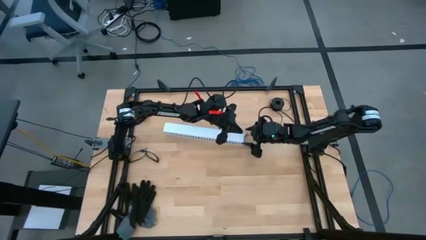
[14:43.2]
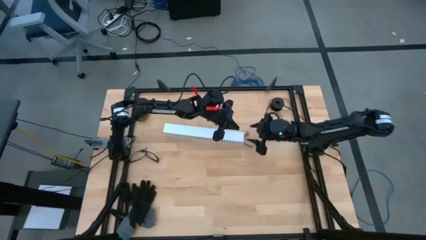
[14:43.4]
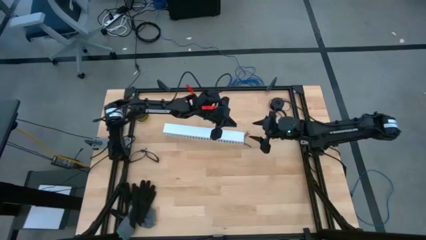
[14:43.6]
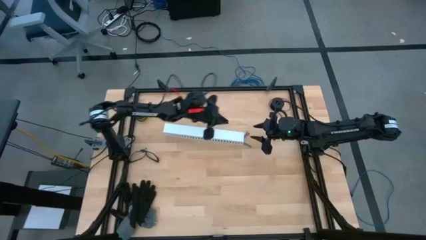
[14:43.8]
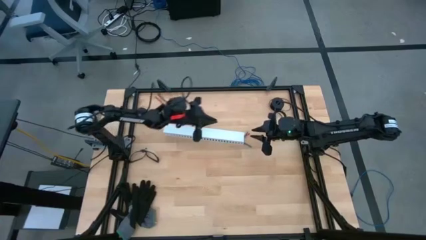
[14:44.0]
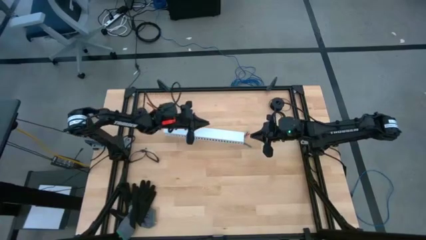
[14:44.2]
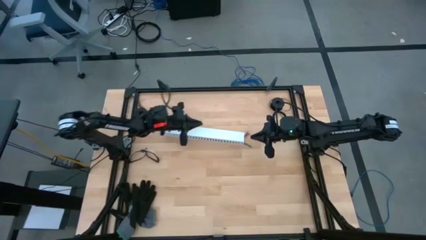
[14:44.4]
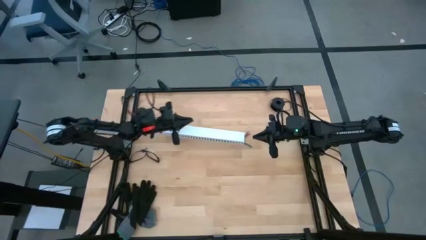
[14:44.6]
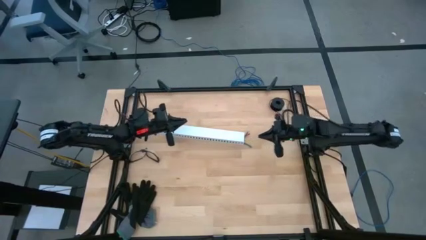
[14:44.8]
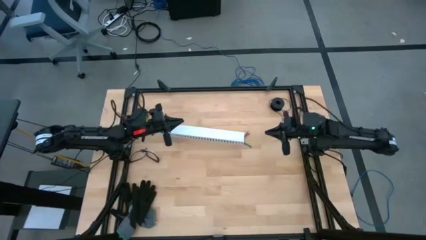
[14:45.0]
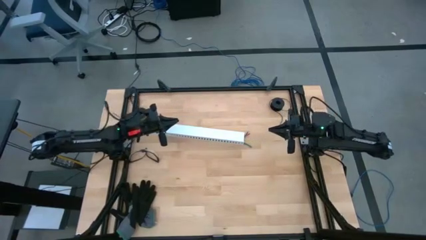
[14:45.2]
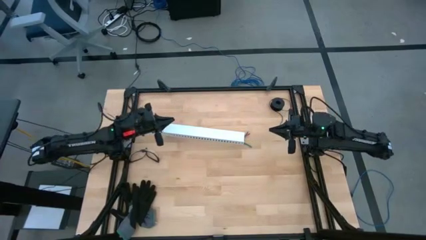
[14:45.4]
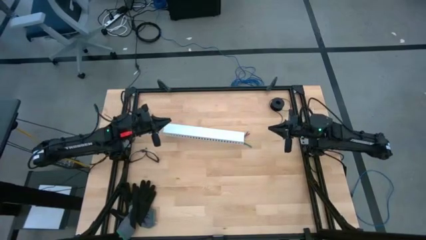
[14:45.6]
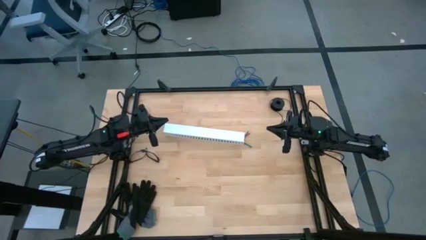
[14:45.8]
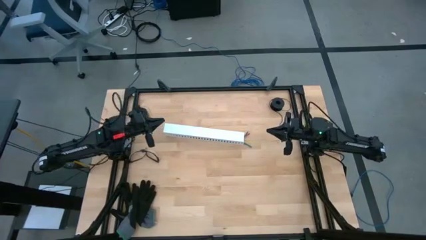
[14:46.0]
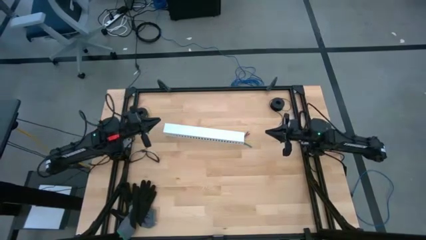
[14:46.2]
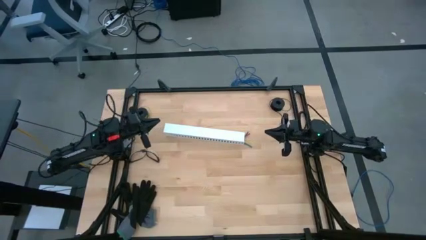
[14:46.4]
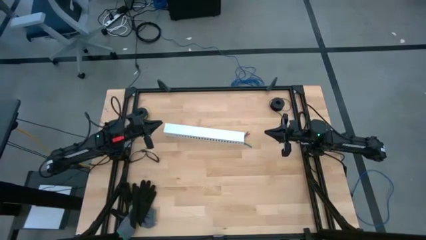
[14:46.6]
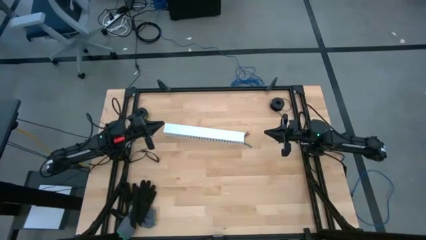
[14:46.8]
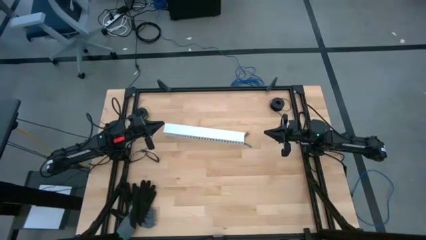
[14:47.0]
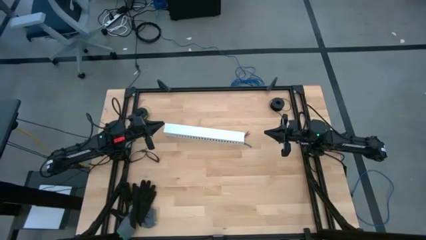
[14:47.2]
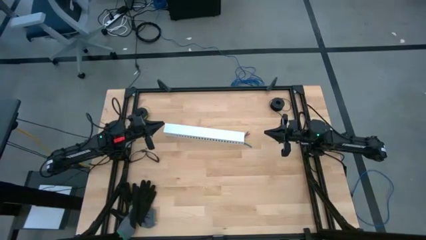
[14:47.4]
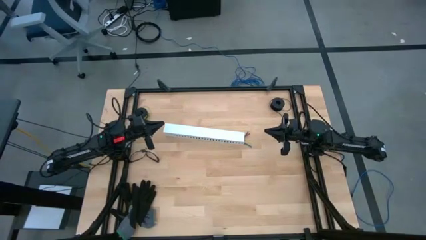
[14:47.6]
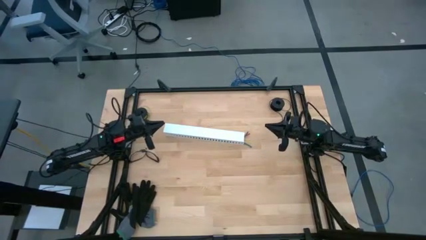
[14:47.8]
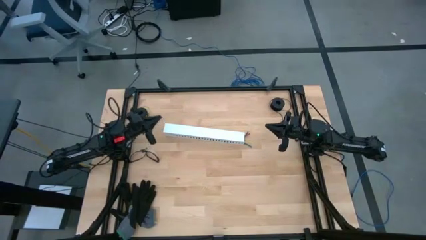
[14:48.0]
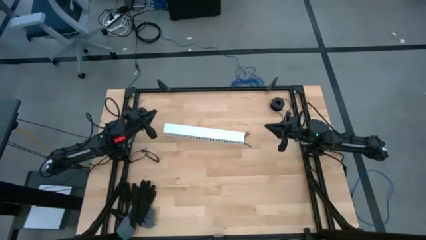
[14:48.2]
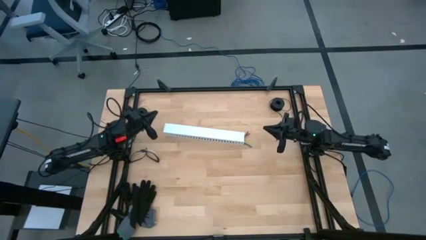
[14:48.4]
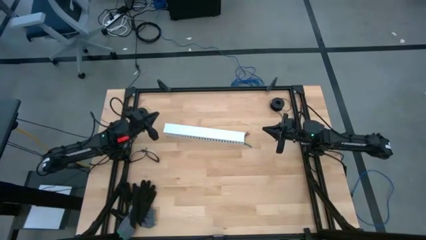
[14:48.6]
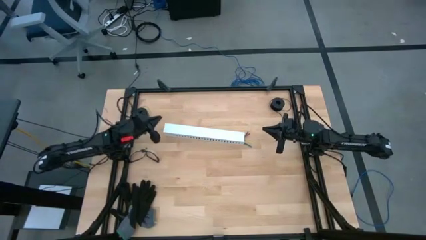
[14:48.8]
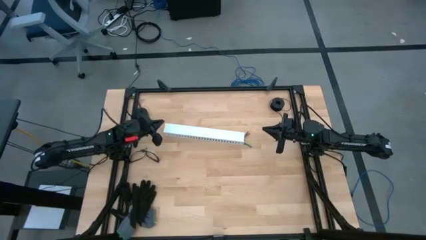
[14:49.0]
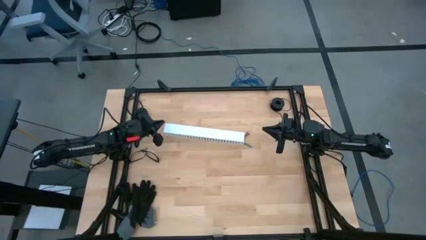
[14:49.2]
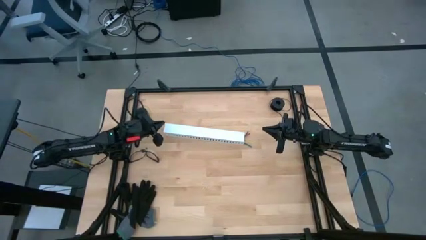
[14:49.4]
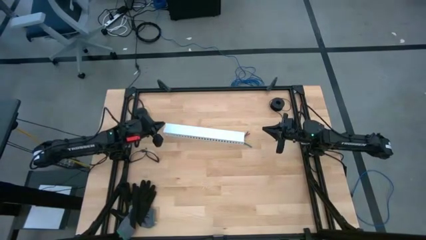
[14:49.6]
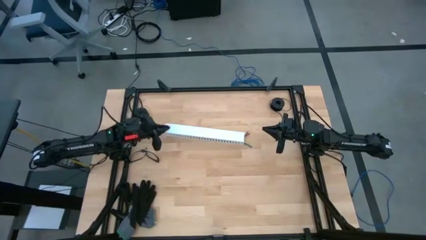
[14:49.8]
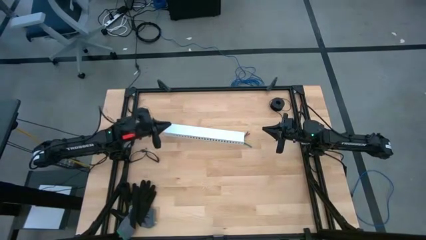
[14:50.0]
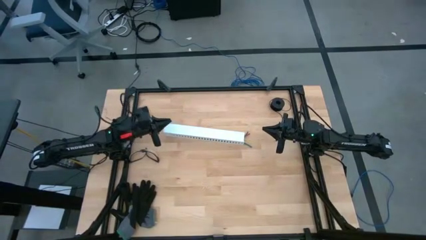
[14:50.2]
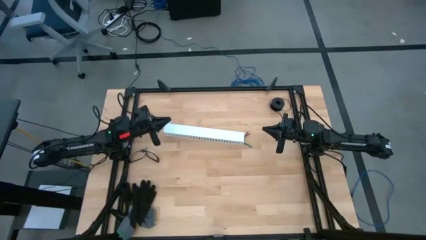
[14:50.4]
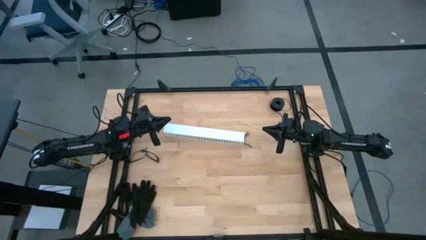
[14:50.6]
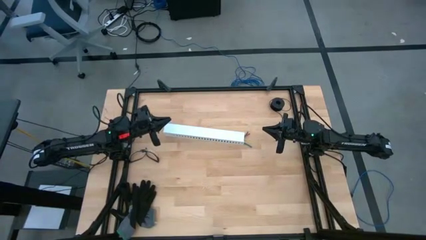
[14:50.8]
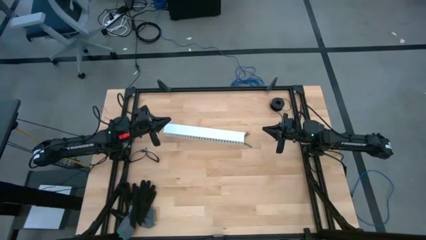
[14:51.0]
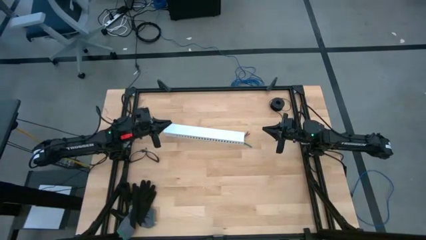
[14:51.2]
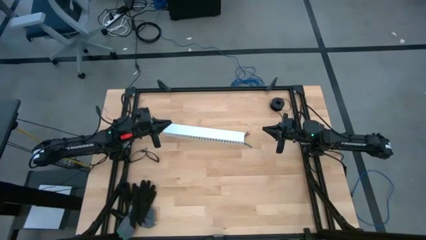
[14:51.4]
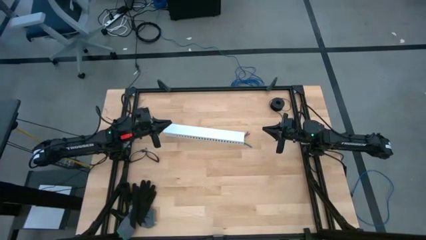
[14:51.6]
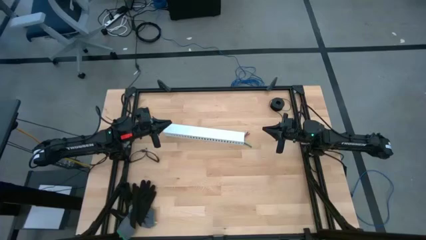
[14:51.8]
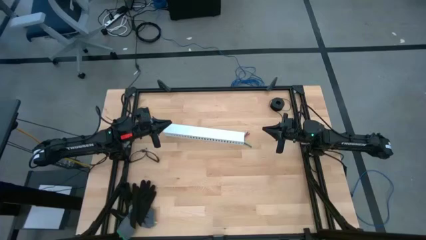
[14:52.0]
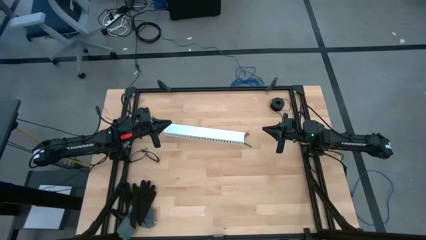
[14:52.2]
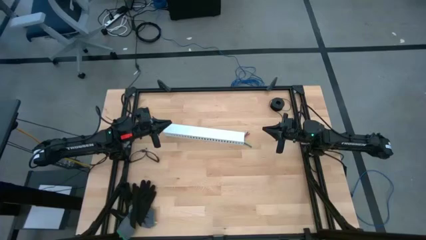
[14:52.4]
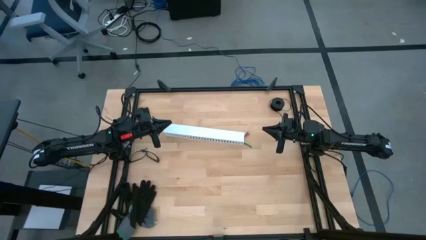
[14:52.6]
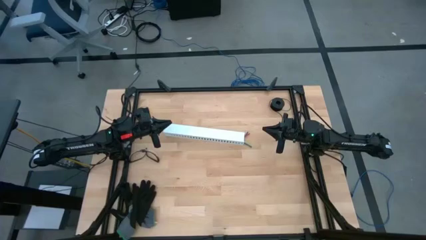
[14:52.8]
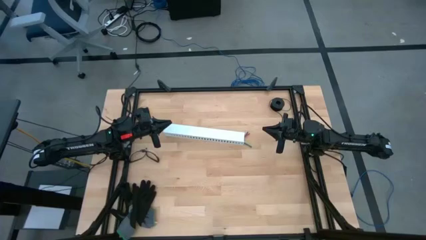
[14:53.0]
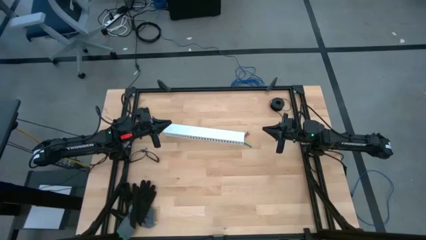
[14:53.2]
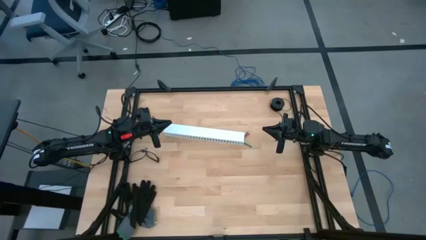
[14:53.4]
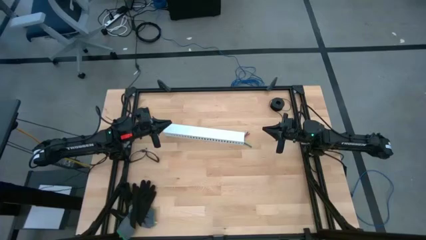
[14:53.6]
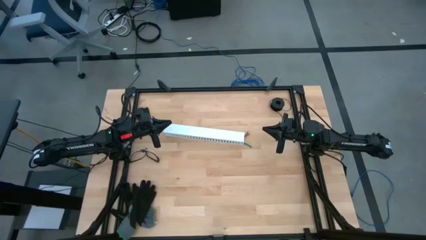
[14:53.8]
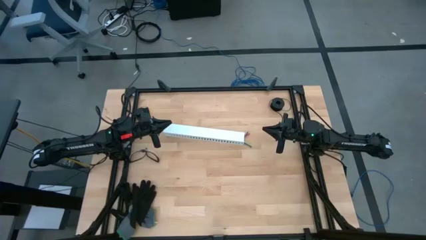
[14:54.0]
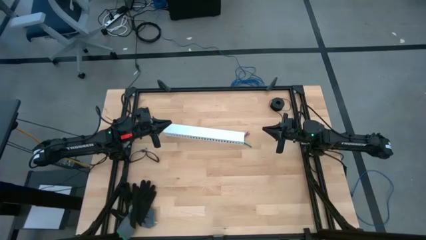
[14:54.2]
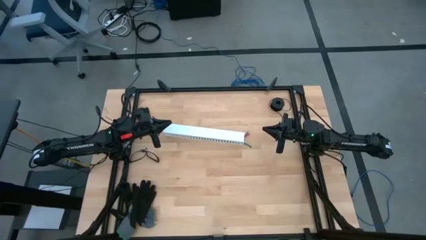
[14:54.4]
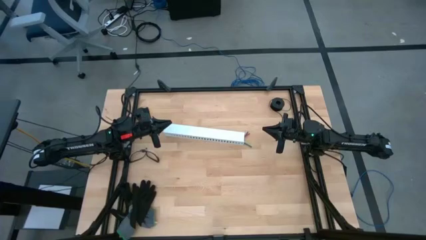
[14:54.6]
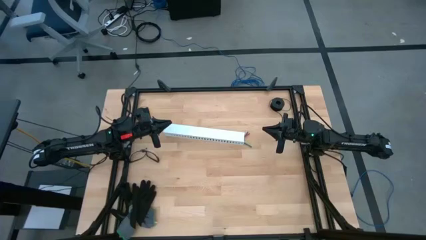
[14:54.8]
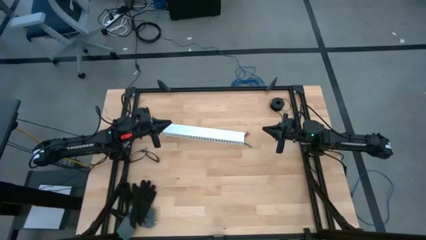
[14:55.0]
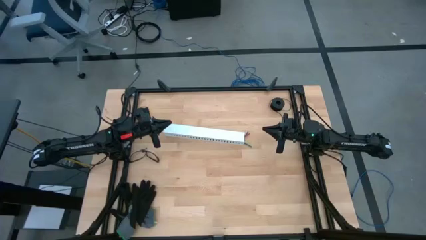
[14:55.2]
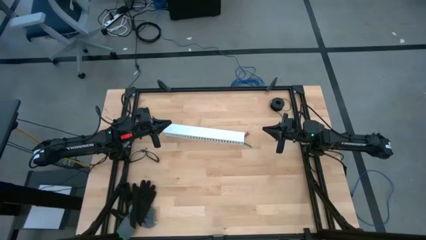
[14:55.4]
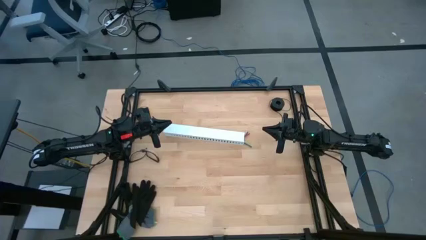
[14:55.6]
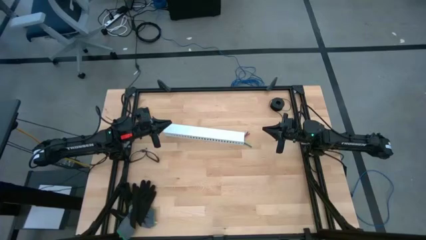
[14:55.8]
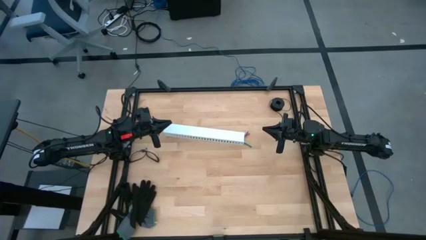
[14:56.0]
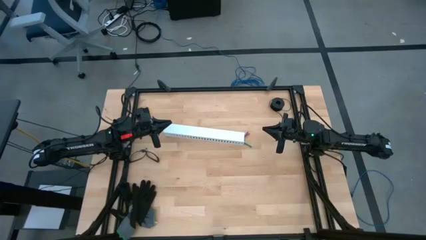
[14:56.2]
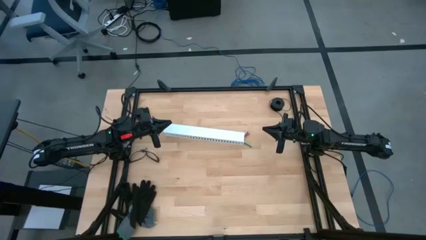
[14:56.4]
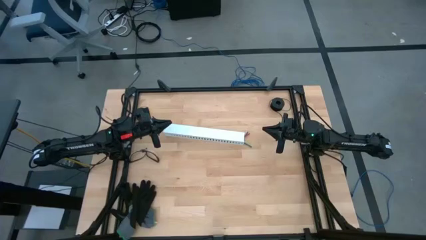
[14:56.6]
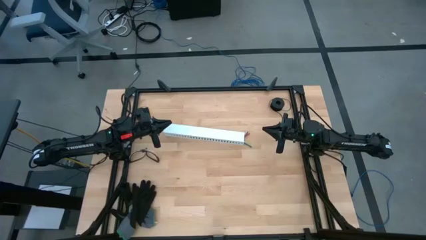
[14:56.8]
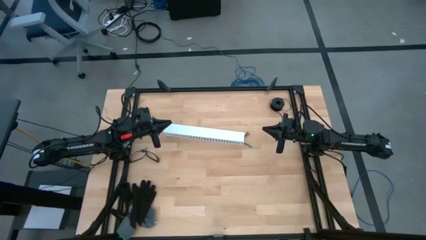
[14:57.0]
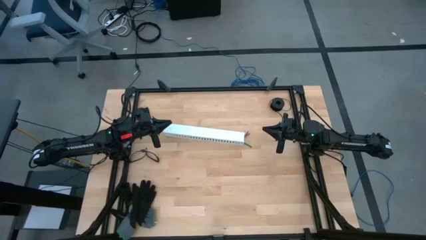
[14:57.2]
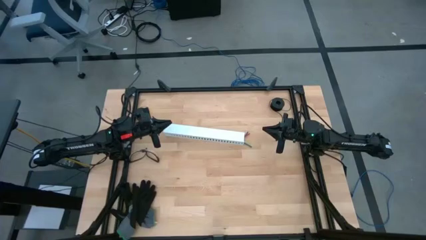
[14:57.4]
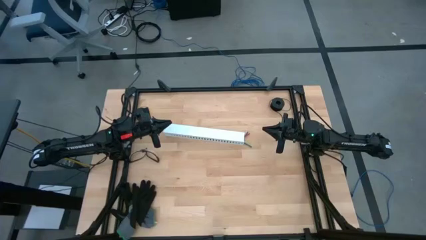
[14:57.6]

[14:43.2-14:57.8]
Task: Ziptie cables
Return to Home Position
